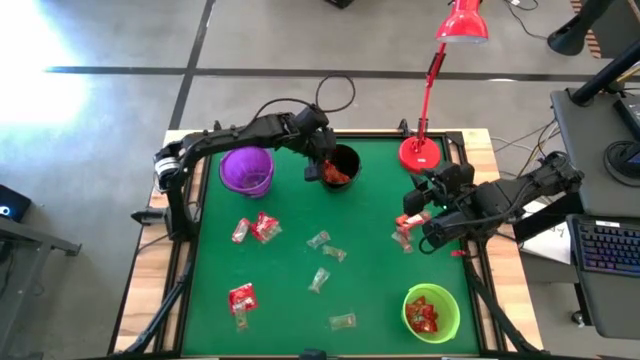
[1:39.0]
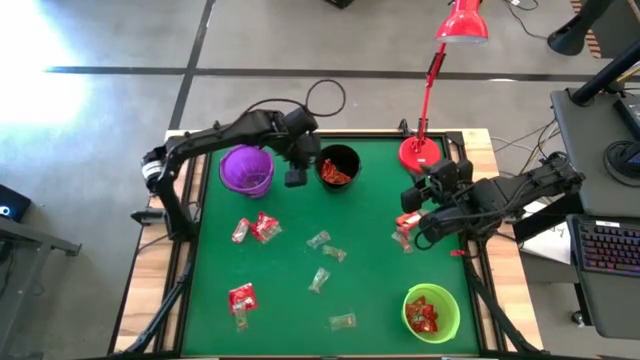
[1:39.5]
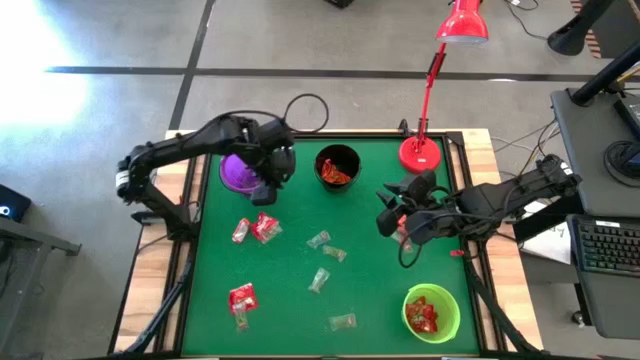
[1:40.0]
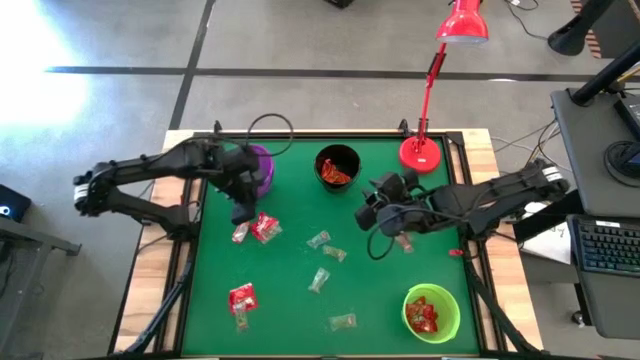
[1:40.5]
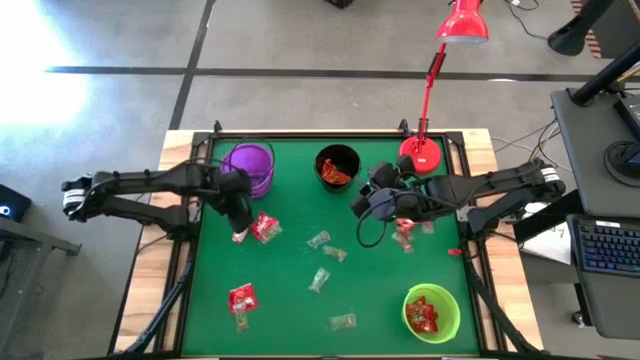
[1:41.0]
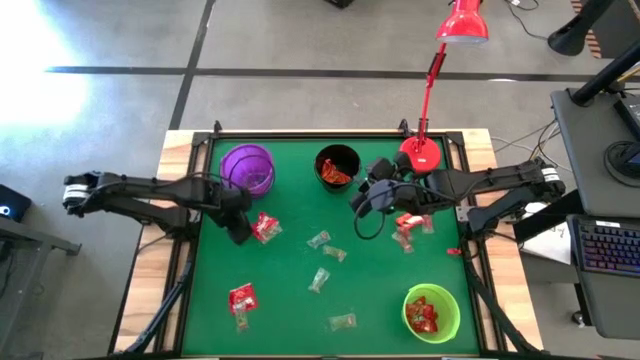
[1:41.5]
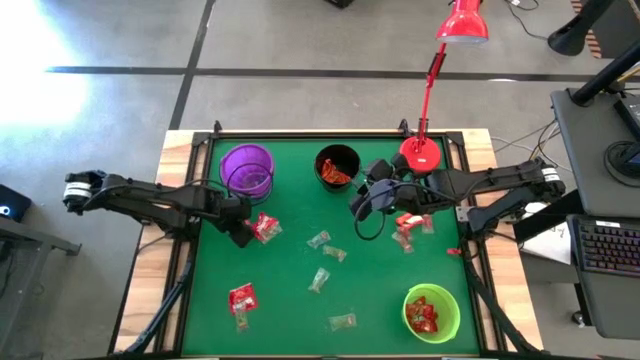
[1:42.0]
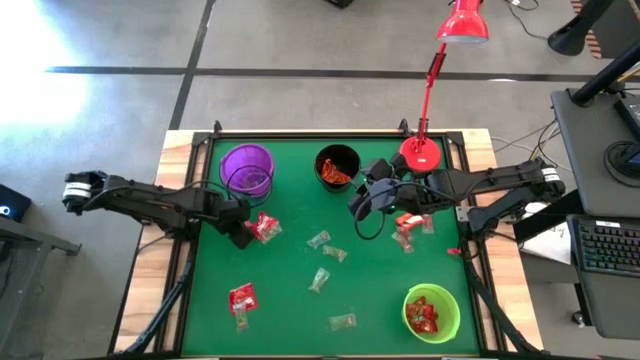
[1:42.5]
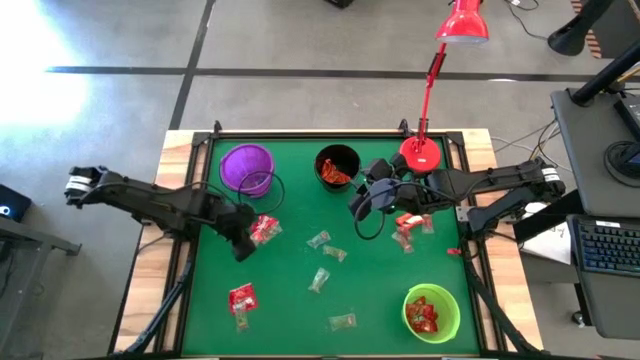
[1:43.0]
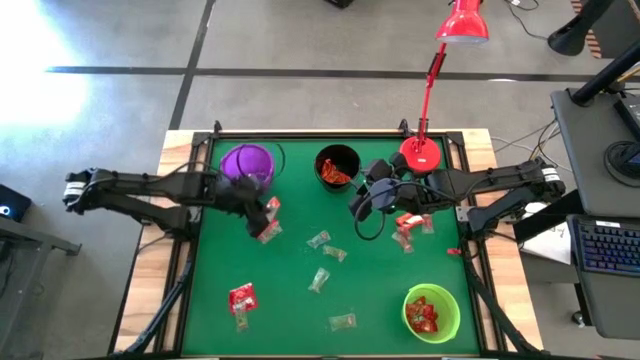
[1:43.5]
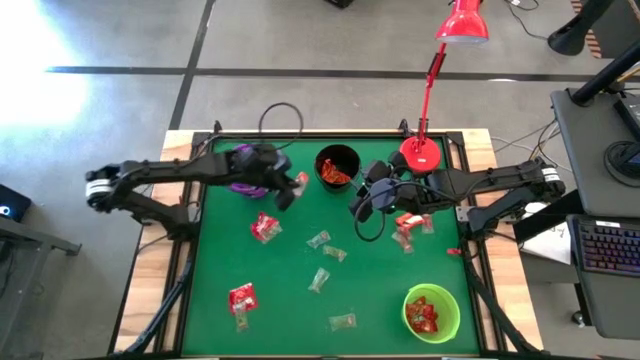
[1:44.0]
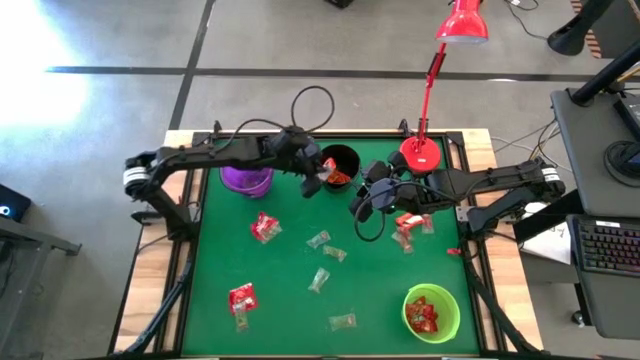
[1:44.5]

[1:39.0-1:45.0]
Task: Sort candy
Put the orange chocolate into the black bucket

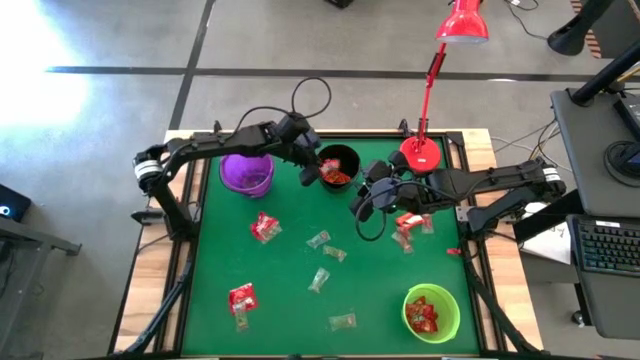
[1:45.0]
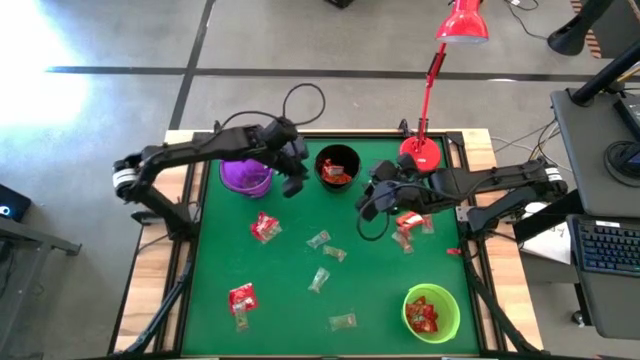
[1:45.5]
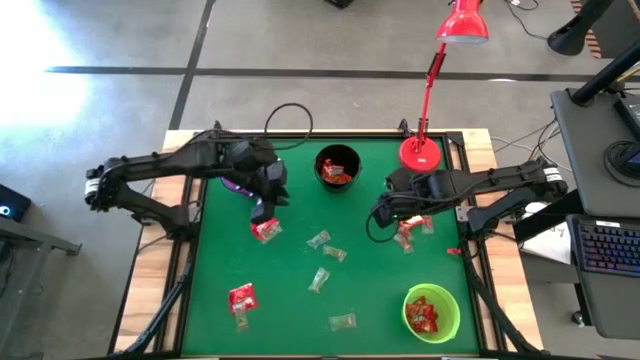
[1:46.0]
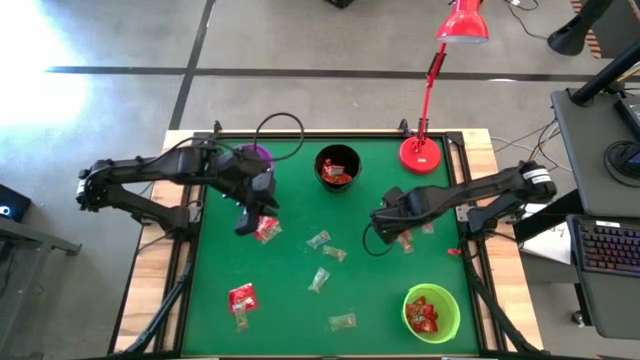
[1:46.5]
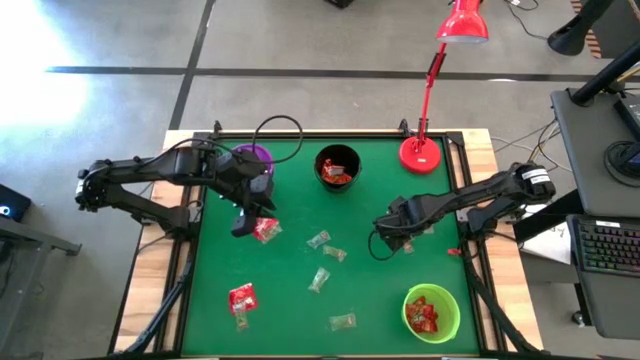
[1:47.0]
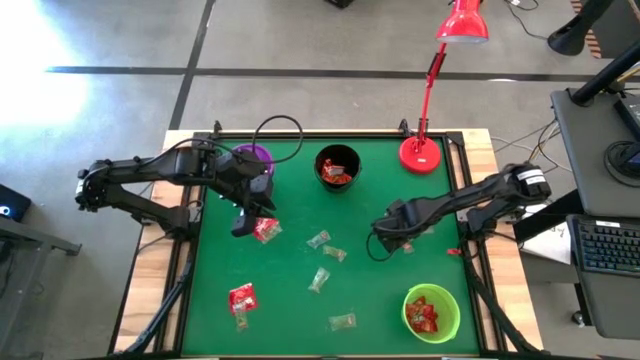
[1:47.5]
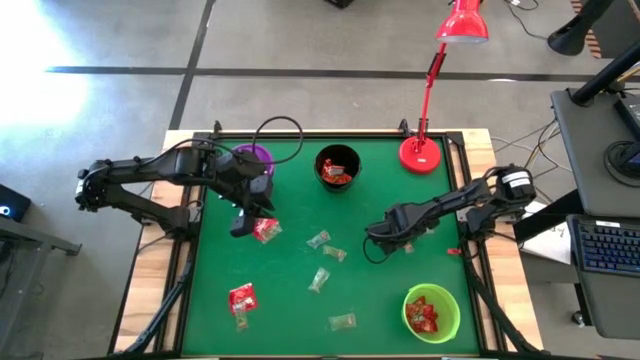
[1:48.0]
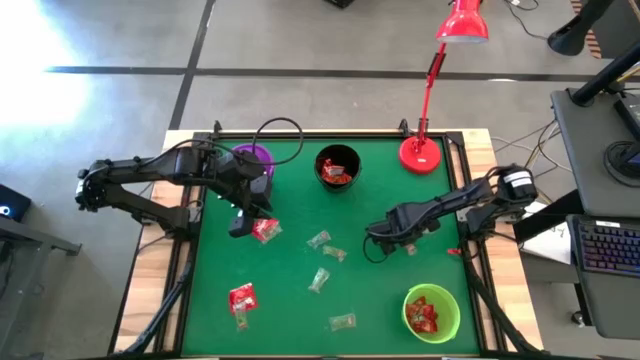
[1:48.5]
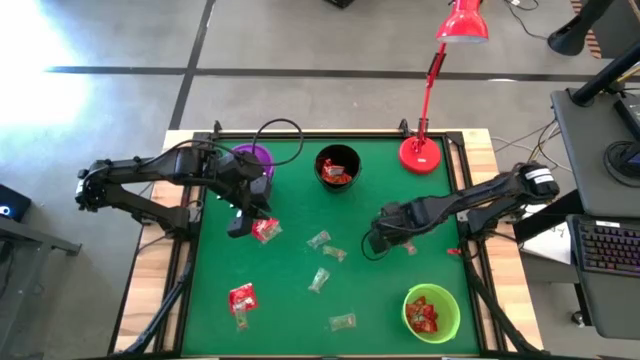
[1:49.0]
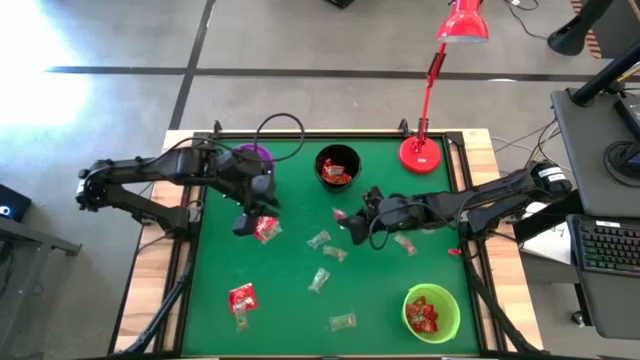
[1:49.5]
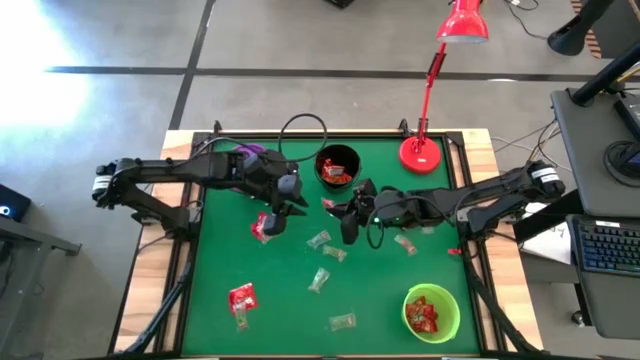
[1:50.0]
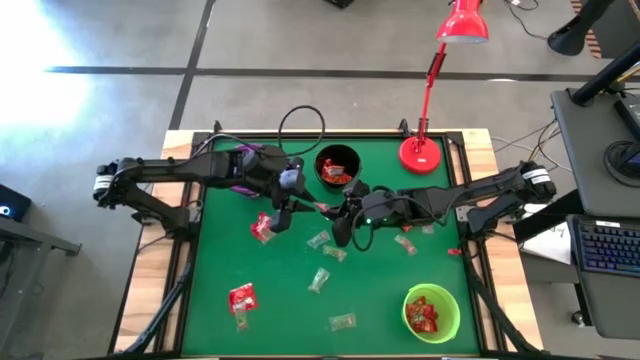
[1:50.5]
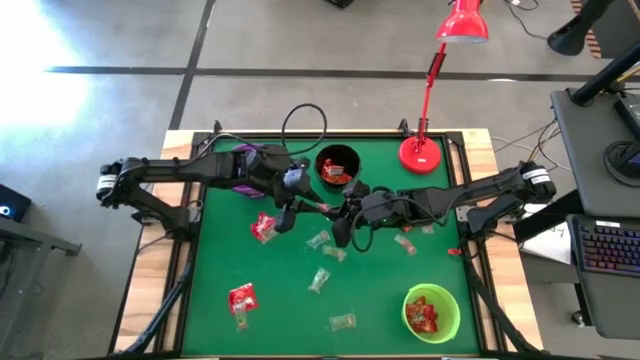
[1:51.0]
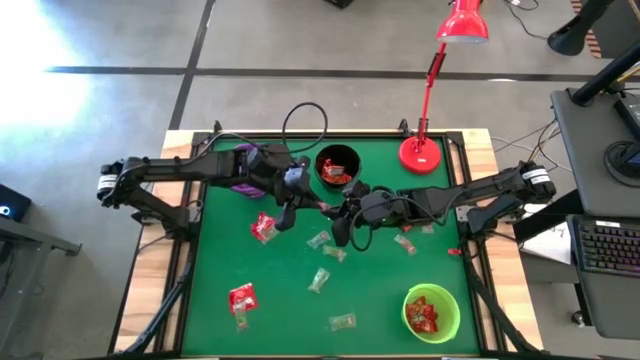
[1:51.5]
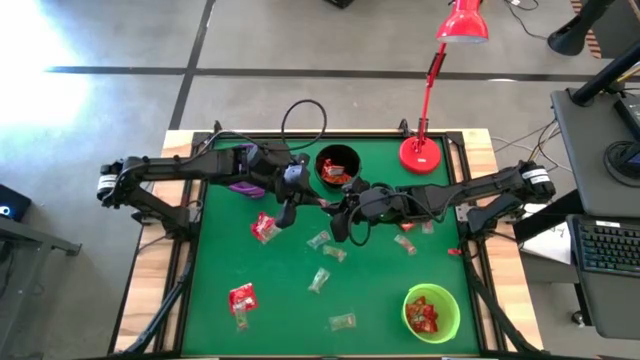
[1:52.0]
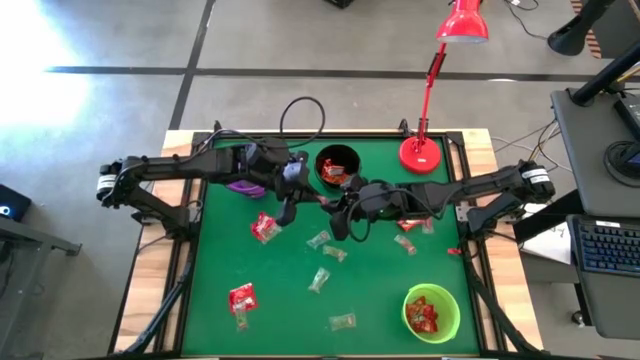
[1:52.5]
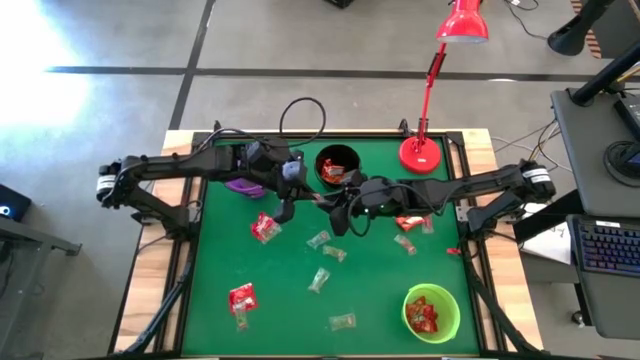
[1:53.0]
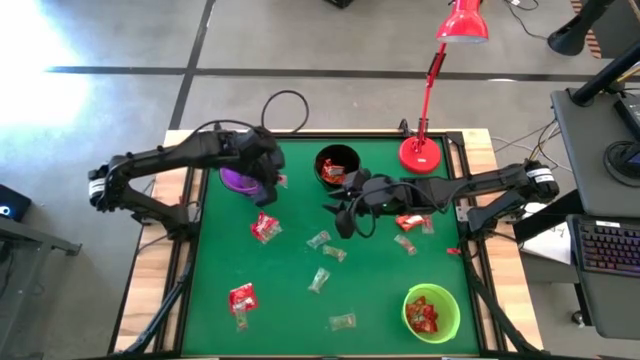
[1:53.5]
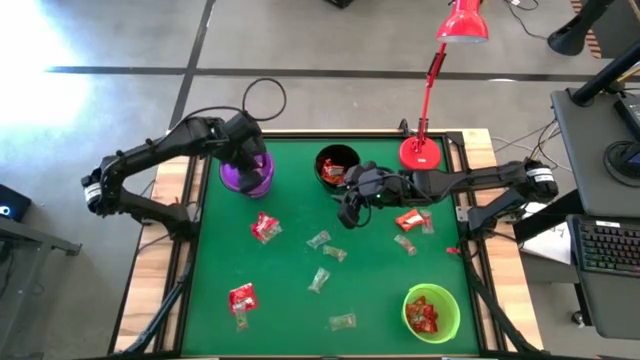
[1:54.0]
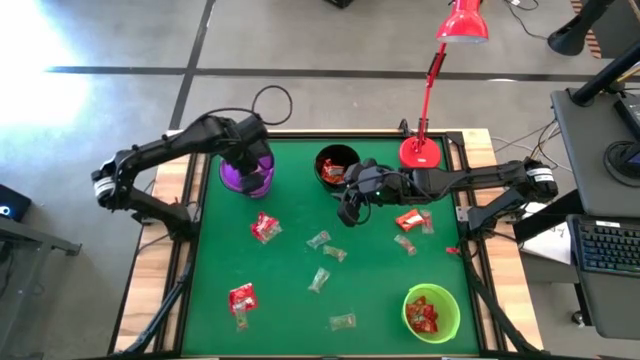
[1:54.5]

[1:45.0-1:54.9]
Put the red gummy into the violet bucket

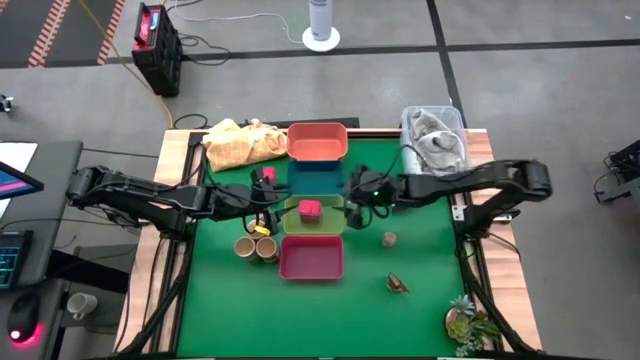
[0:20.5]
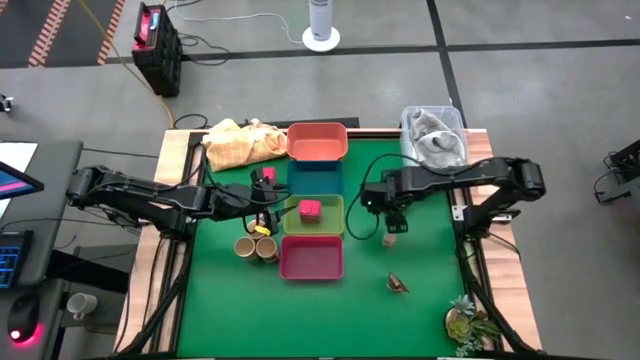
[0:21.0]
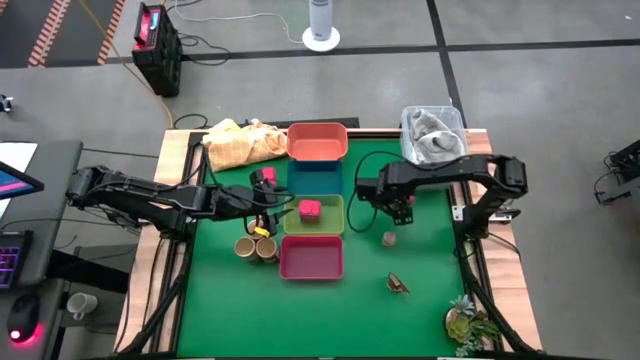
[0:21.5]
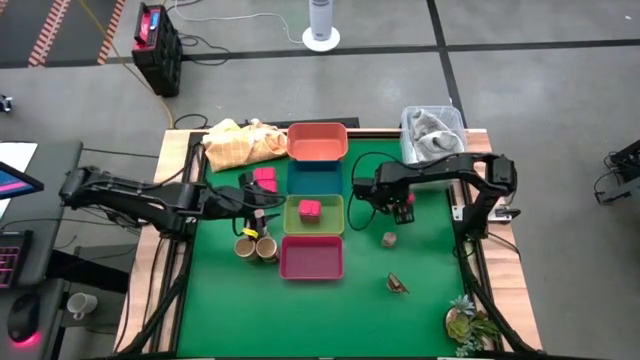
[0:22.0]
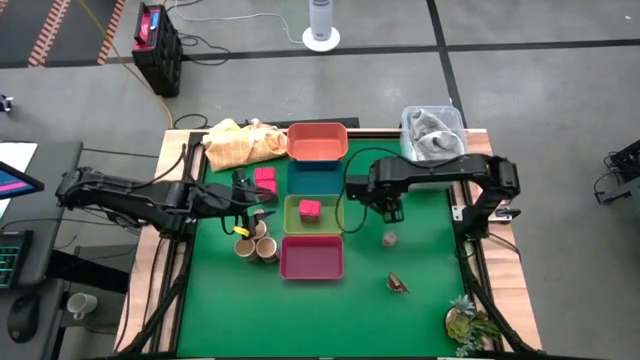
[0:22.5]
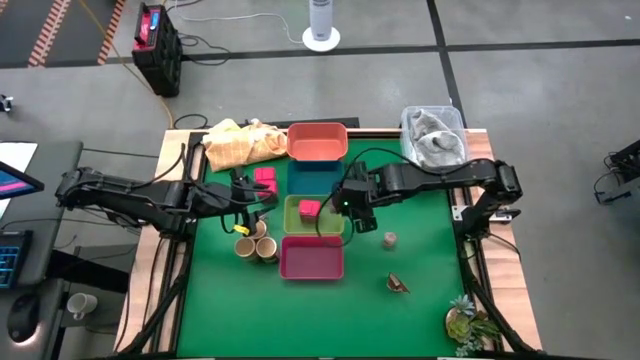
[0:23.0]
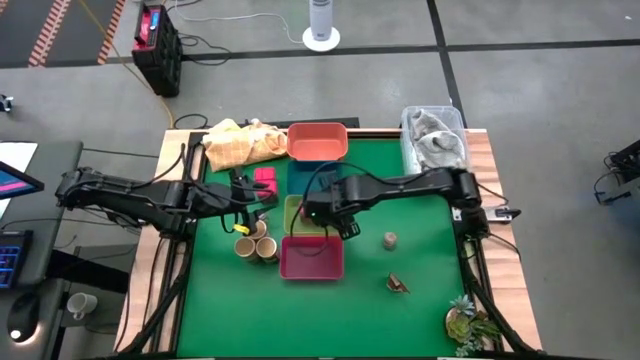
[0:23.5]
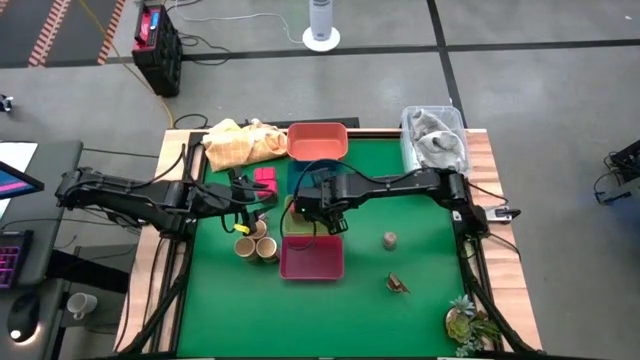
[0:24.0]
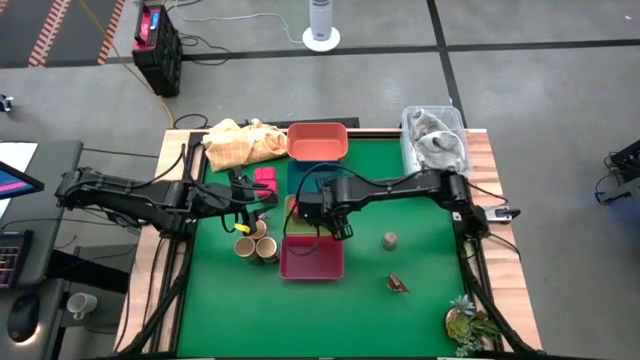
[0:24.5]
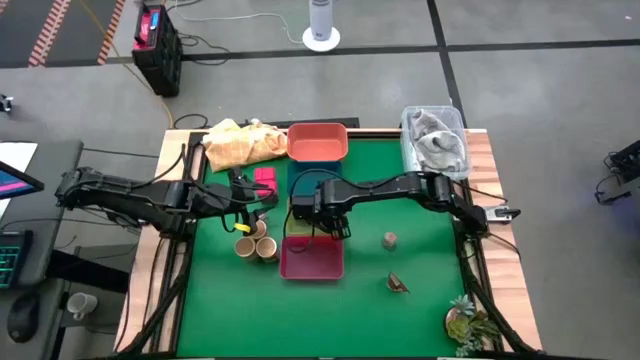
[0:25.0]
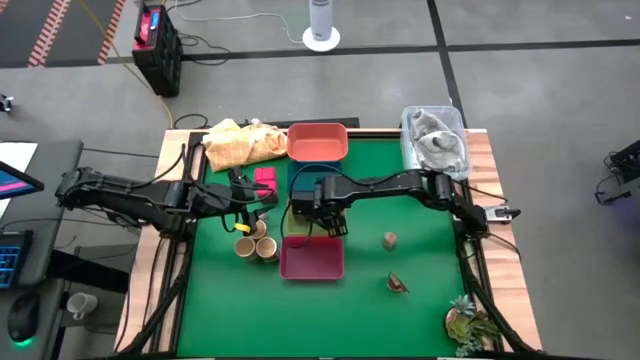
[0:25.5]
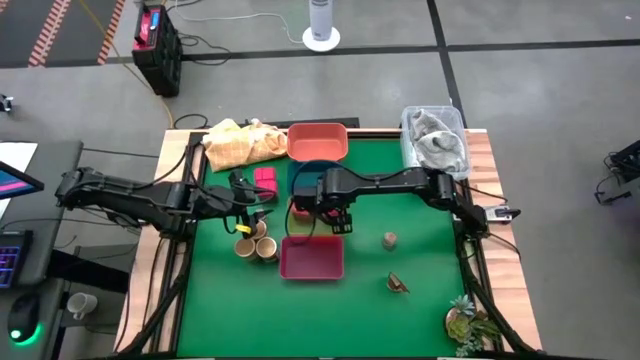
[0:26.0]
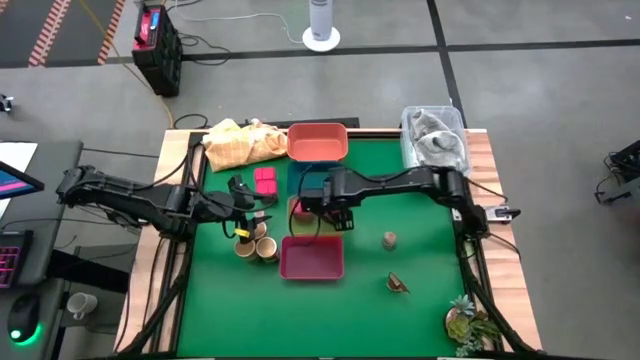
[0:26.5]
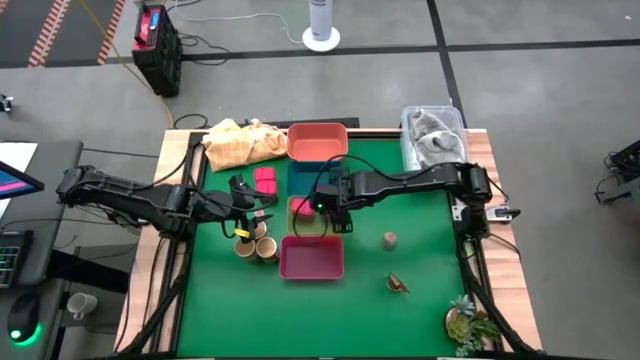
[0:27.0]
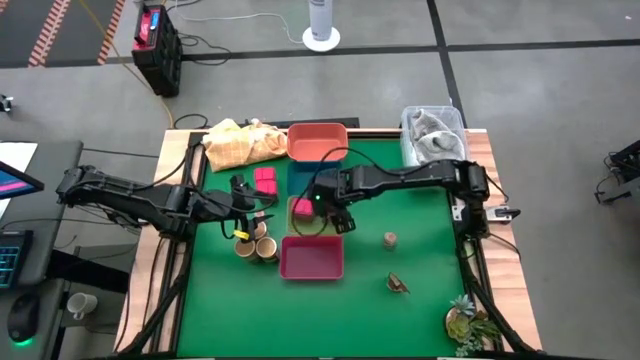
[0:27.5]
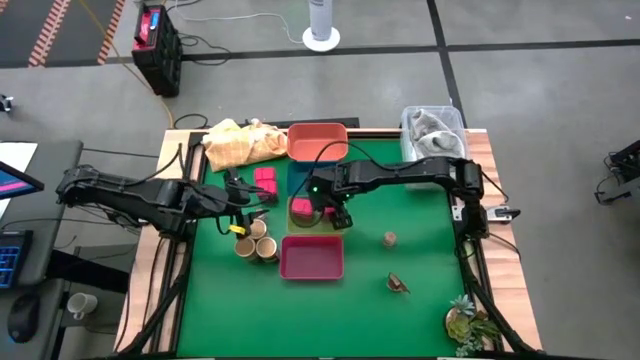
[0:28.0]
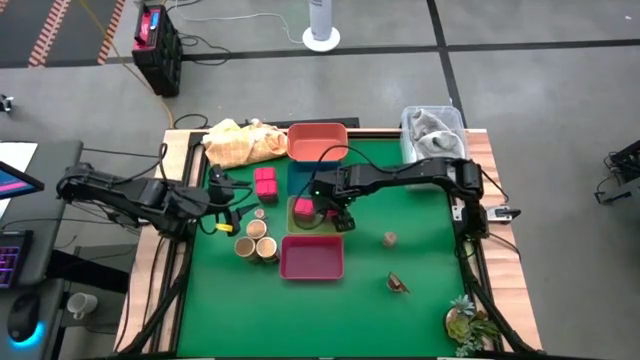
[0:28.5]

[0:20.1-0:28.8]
Task: Sort spices by type
Put the right red seasoning bottle into the green bin
